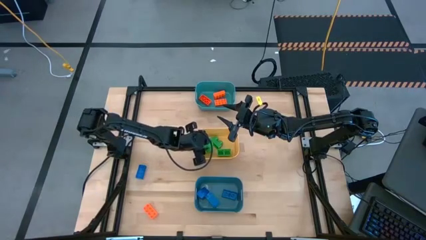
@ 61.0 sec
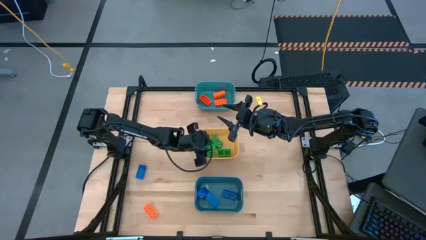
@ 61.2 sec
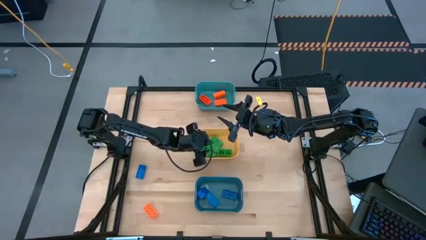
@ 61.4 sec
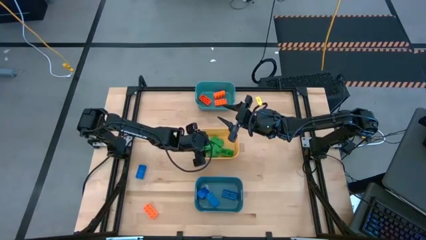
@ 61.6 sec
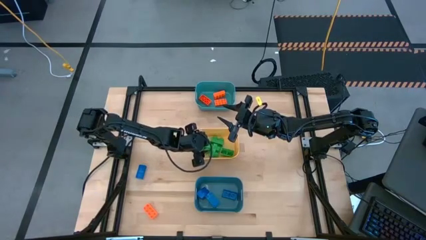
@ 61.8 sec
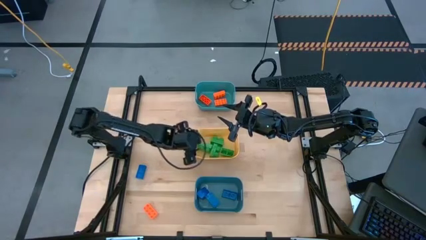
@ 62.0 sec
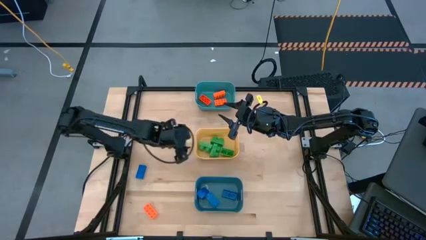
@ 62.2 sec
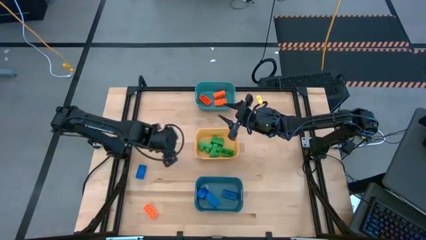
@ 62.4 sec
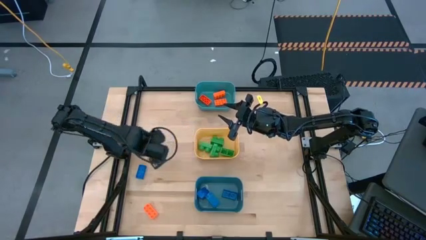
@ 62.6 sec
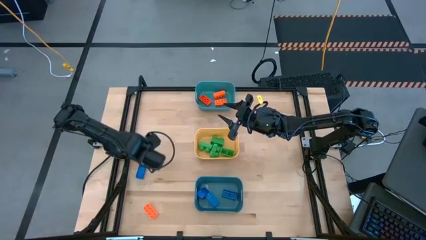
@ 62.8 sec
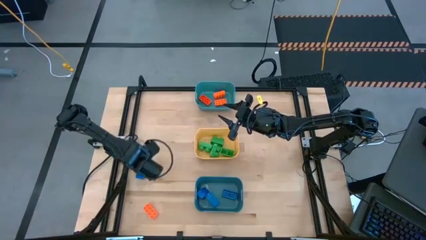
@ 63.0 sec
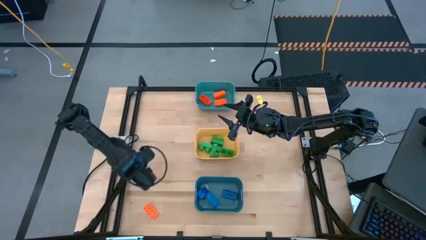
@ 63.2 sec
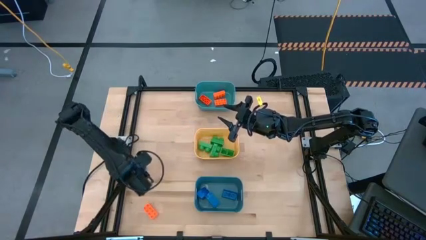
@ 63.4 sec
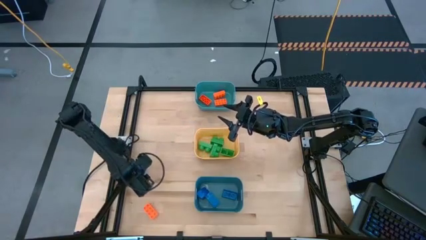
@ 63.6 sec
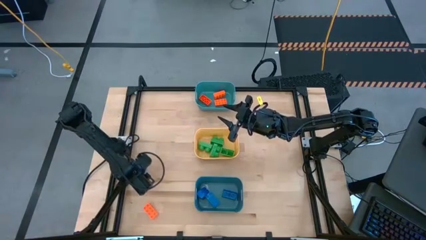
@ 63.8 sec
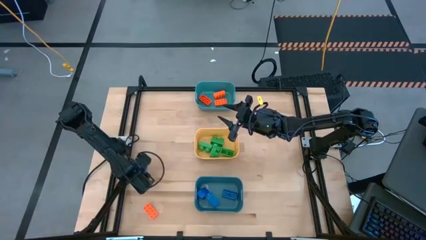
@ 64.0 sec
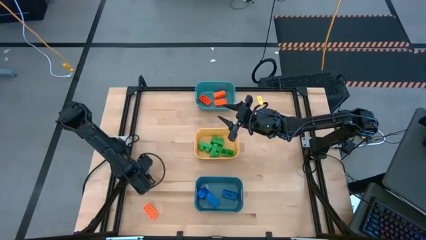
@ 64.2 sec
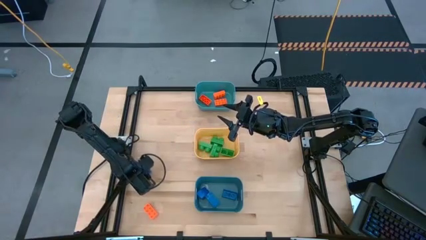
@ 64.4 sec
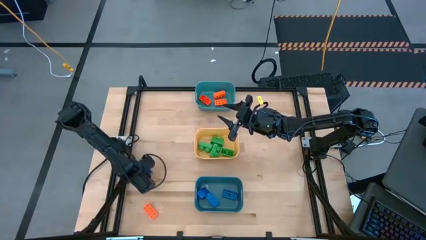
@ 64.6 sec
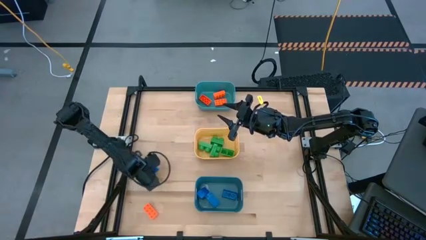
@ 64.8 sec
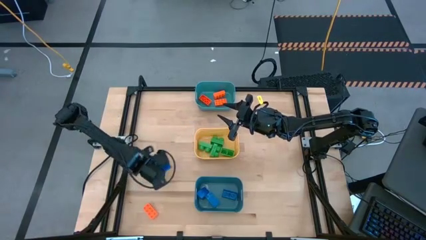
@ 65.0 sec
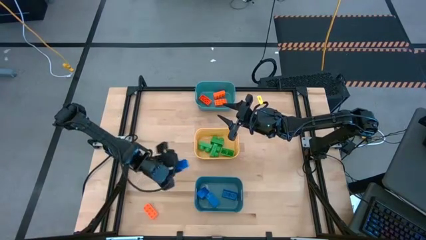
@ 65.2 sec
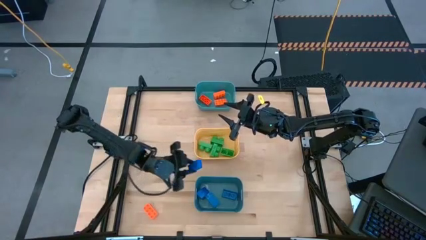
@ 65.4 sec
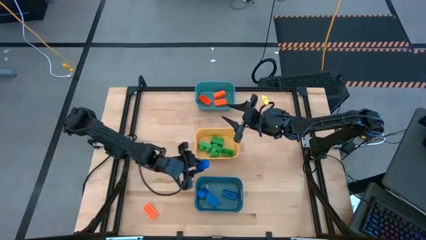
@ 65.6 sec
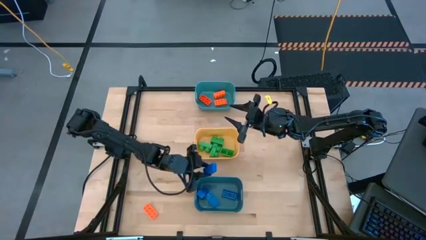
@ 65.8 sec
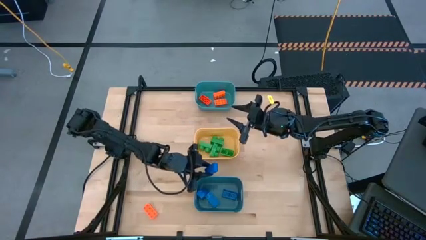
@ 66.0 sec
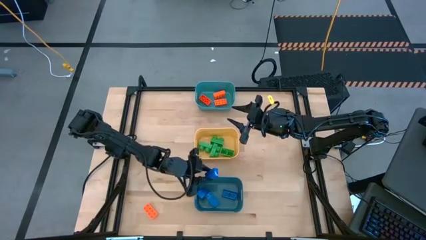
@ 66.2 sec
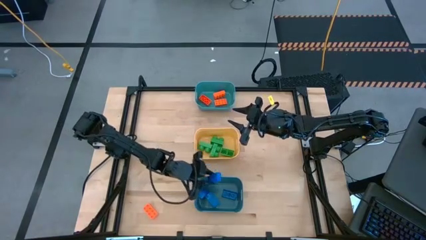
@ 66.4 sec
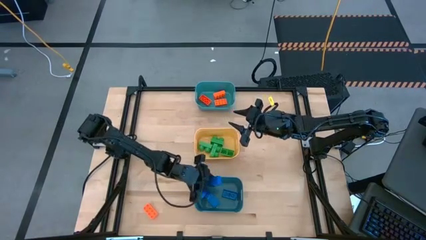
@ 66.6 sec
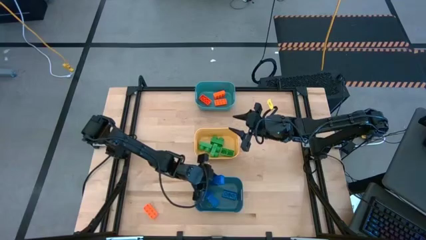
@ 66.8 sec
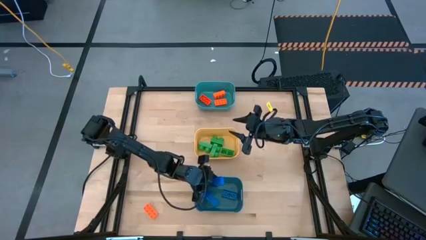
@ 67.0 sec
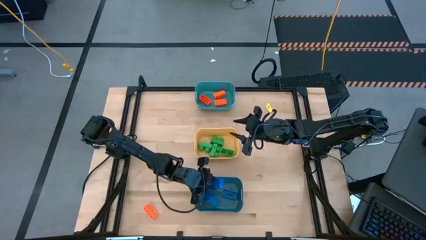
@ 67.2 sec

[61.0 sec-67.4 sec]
Task: Sort & place blocks by color
Put the blue game piece into the blue bin

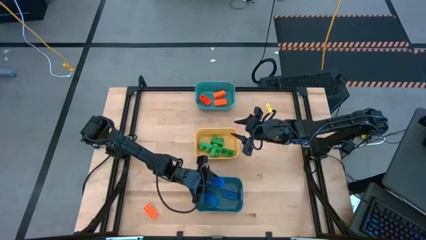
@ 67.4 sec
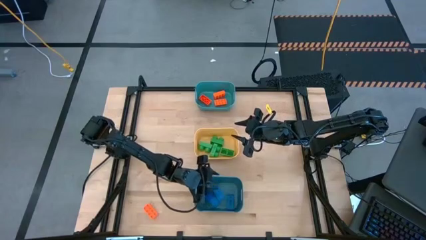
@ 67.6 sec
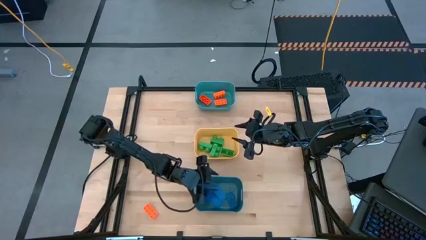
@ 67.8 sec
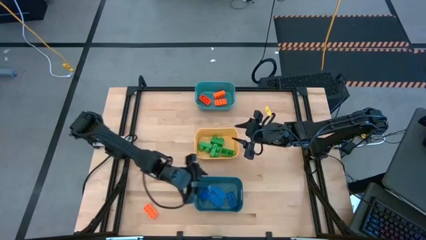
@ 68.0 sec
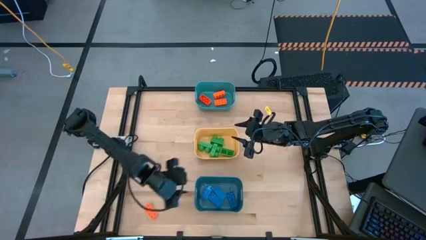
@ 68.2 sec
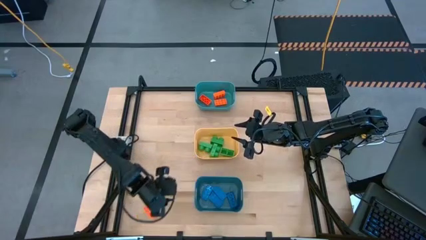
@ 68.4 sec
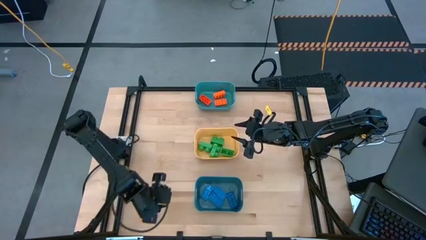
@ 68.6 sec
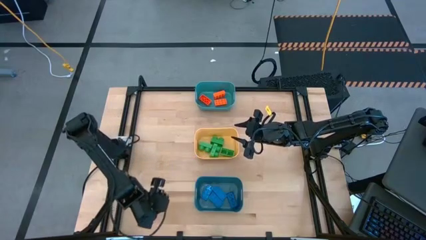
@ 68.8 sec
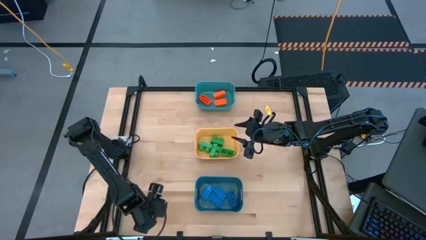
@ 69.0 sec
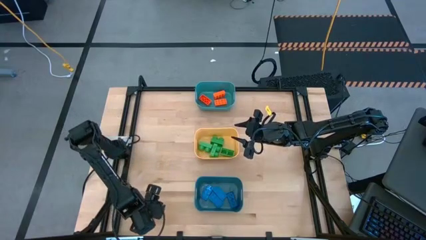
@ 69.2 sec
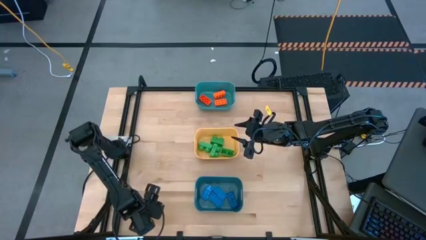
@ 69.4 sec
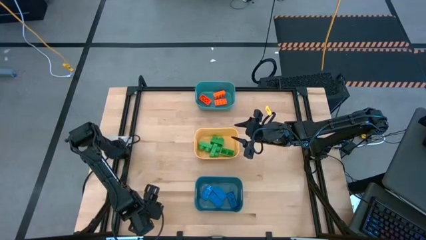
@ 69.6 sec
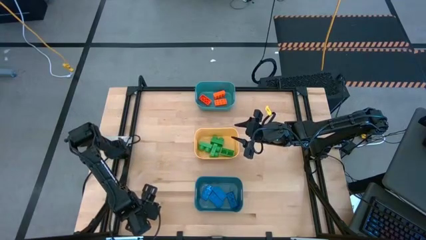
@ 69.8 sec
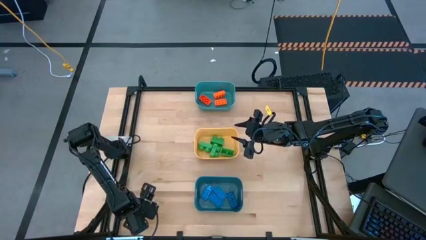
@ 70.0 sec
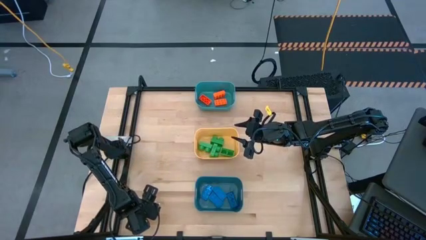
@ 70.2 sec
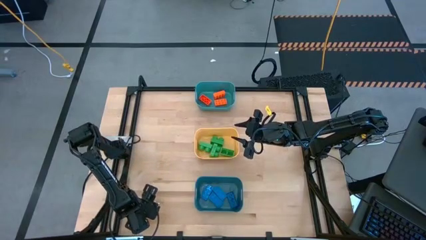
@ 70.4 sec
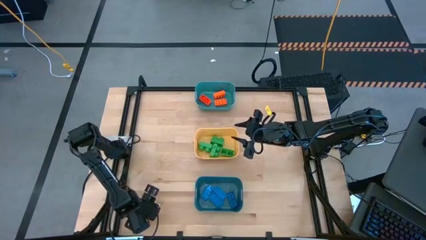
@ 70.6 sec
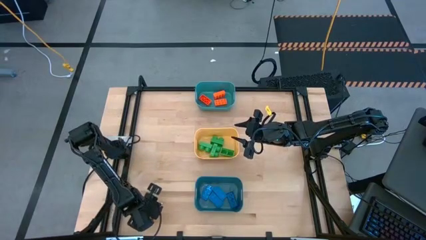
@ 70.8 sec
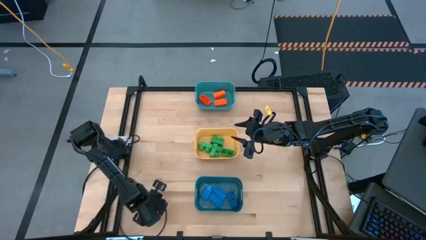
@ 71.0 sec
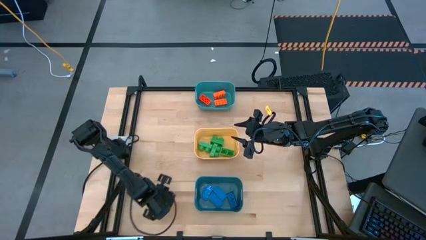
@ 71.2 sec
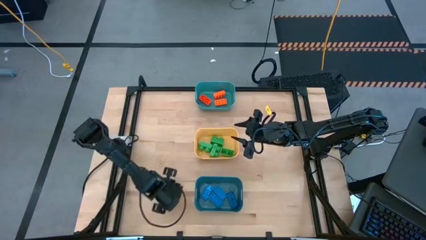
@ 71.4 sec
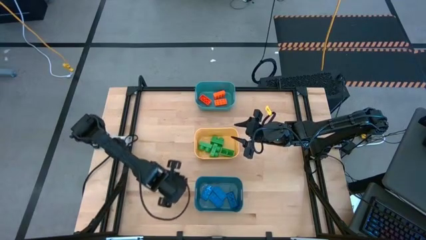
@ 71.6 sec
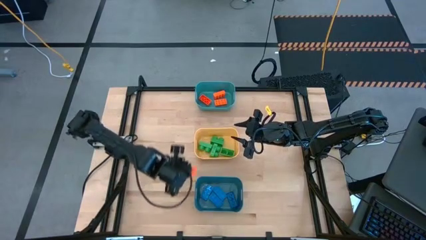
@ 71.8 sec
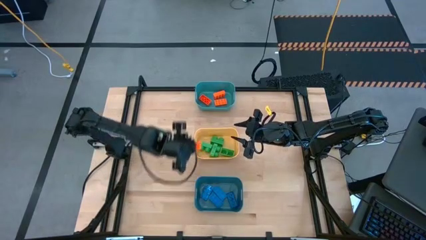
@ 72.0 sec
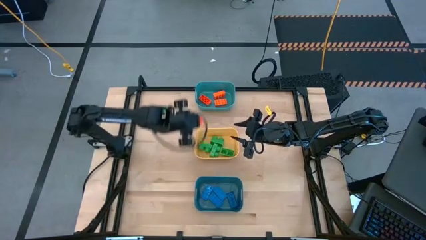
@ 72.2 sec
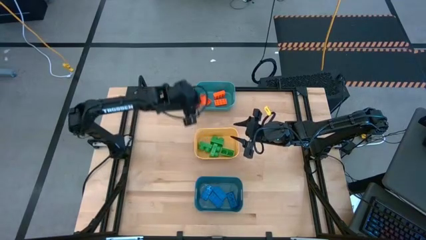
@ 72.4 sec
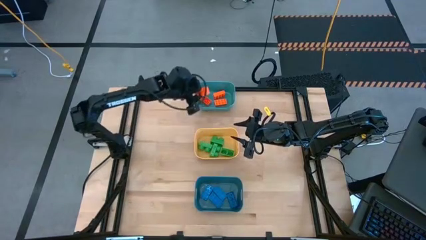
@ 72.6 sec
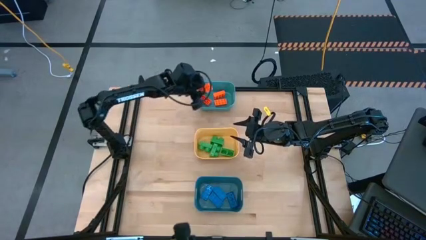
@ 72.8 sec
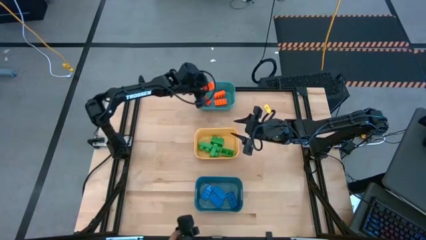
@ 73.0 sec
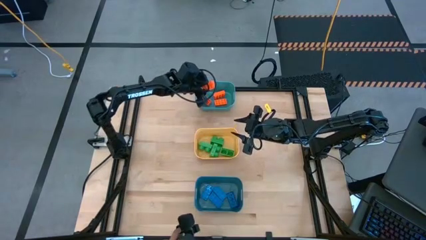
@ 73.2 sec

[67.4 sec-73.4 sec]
Put the orange game piece into the green bin

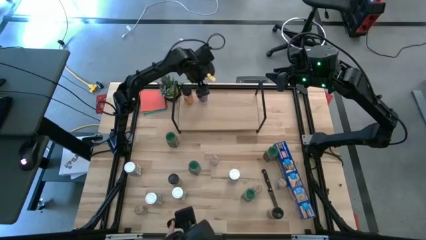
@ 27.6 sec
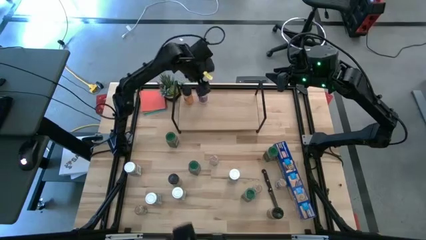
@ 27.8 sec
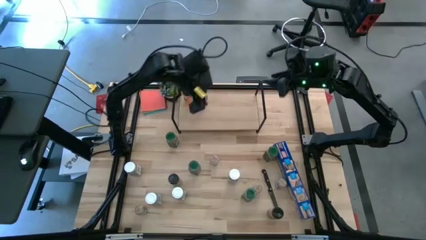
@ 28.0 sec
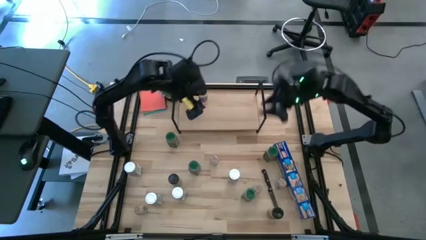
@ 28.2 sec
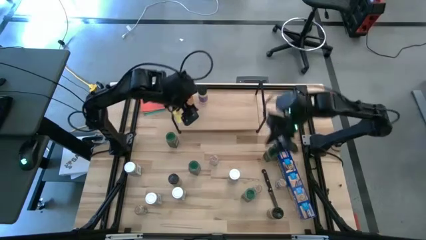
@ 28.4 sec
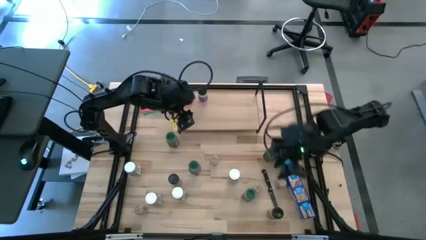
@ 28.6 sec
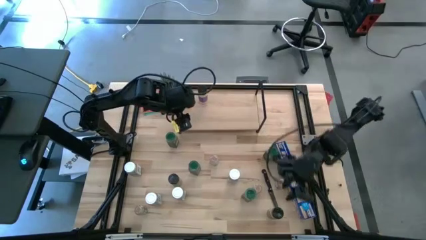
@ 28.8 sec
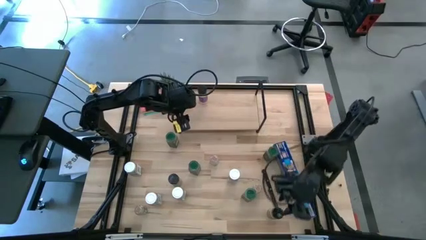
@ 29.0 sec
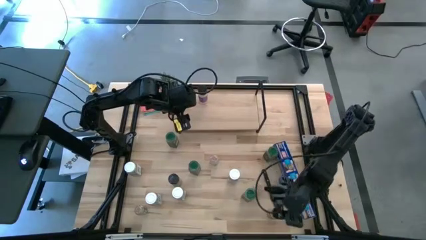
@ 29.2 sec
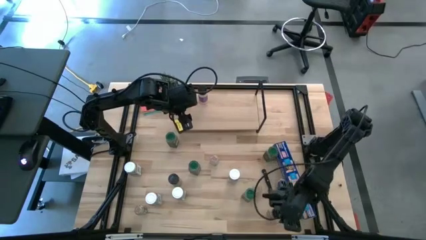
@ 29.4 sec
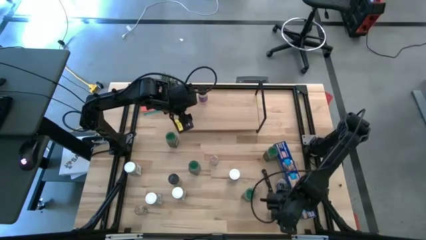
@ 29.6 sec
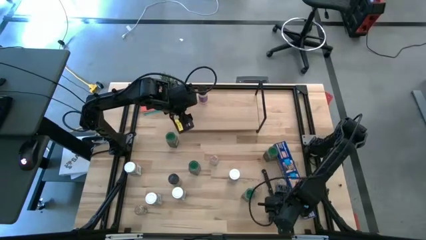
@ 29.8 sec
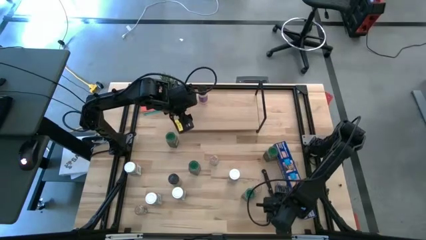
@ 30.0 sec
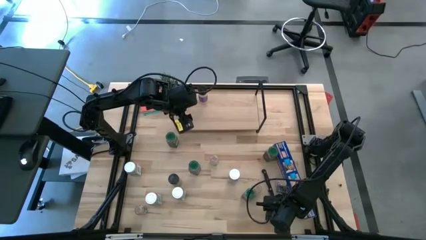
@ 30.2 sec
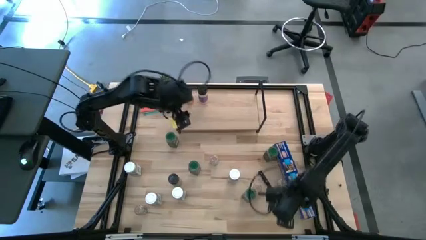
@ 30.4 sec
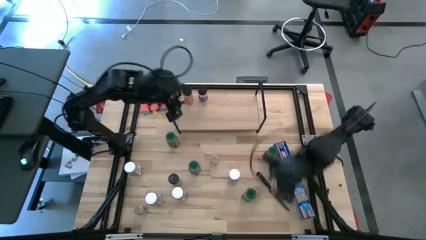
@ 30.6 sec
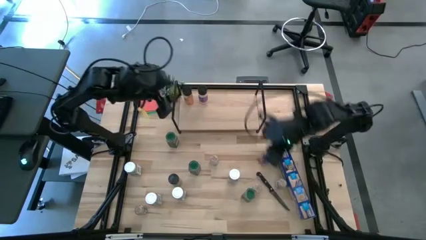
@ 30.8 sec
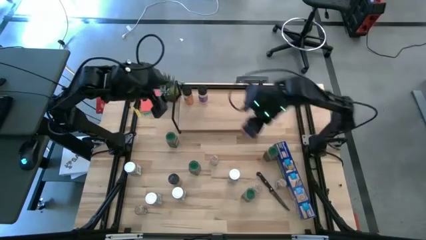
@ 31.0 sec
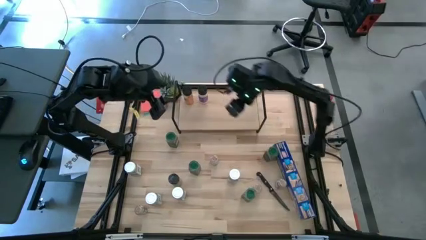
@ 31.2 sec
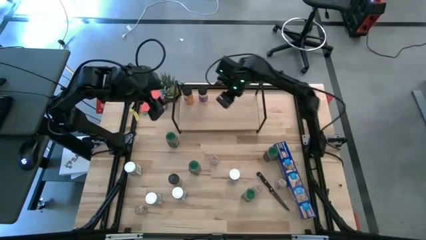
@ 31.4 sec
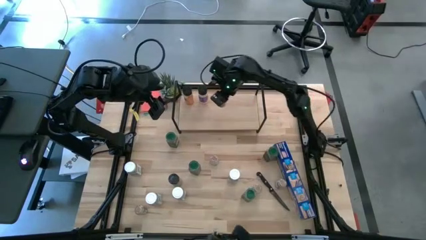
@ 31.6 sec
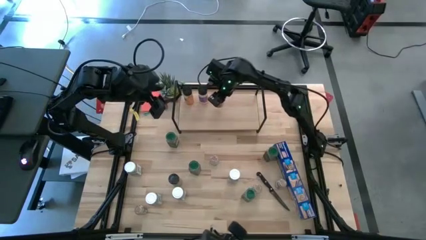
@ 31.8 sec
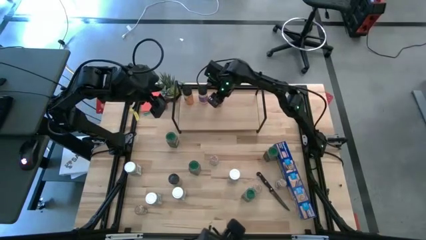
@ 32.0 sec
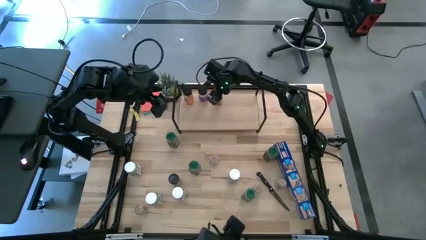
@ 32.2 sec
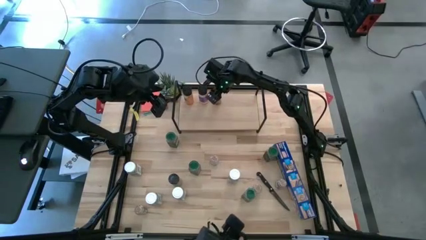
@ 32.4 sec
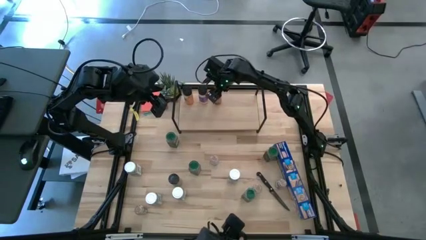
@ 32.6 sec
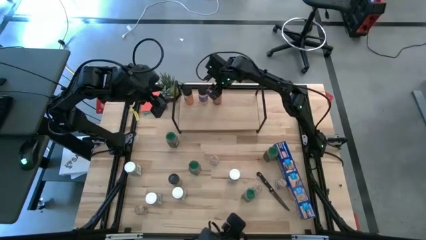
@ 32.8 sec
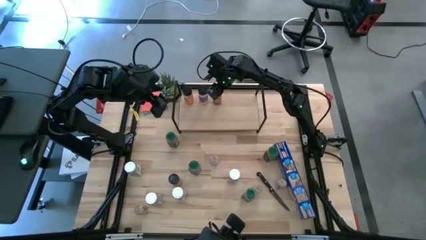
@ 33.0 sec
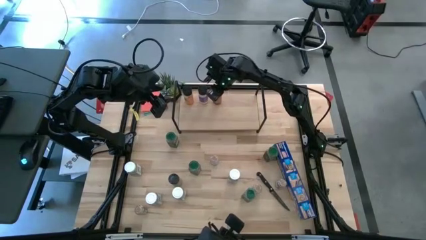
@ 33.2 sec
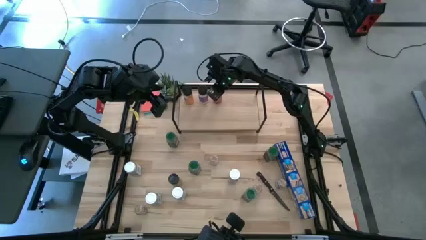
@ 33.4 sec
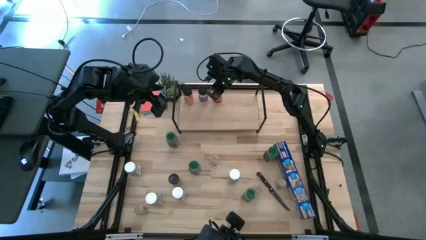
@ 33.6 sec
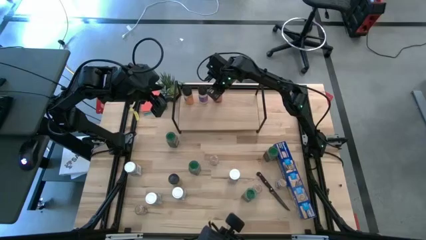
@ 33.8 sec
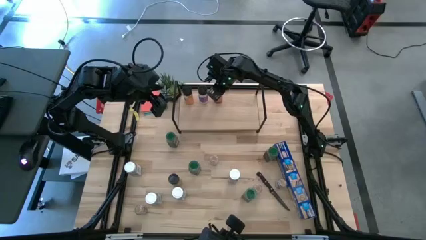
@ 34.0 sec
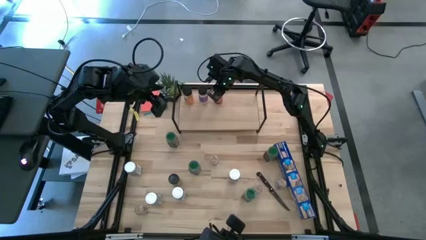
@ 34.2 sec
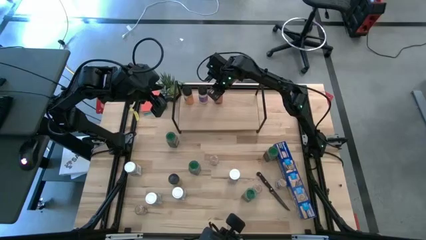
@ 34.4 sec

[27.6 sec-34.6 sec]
Task: Shelf spices
Put the black seasoning bottle on the shelf
